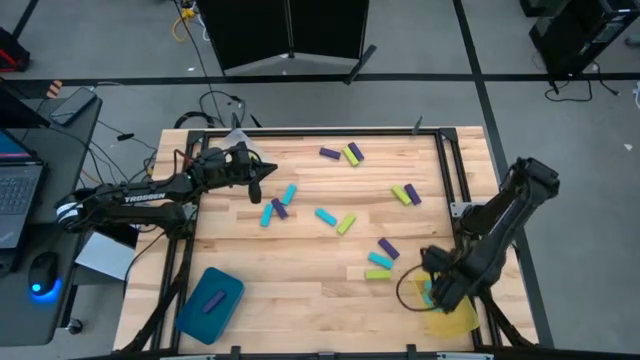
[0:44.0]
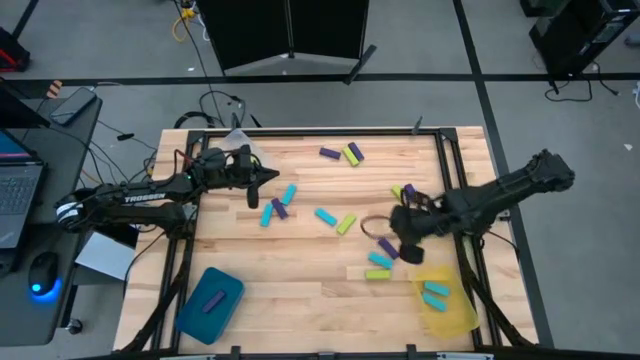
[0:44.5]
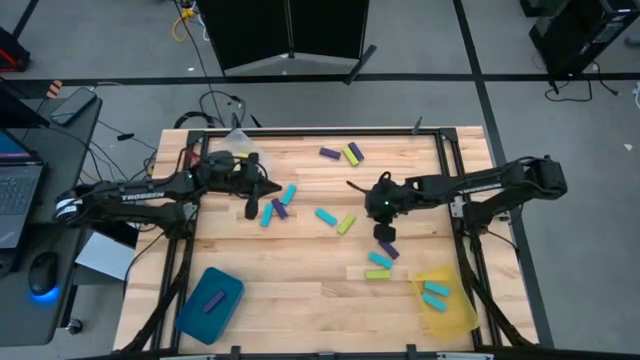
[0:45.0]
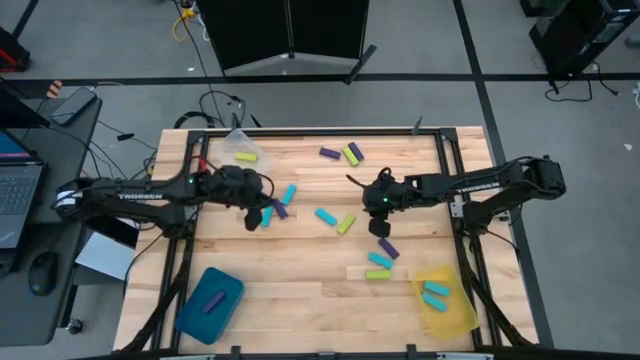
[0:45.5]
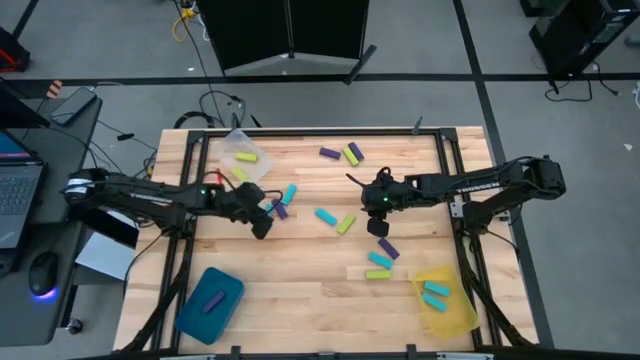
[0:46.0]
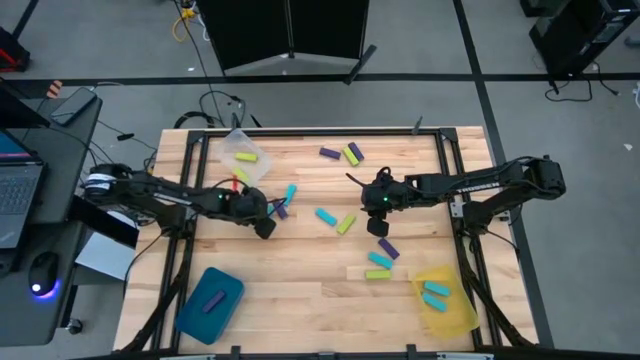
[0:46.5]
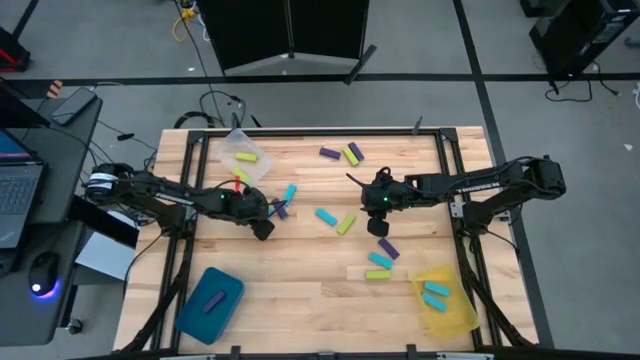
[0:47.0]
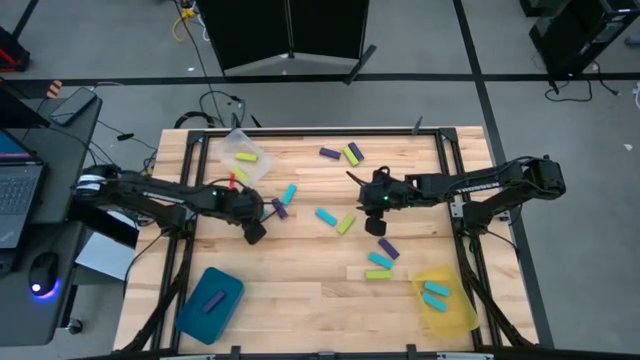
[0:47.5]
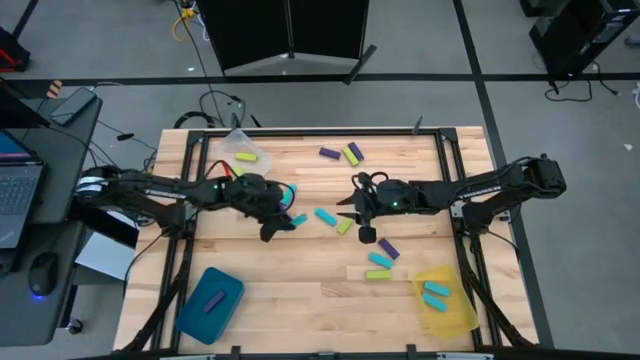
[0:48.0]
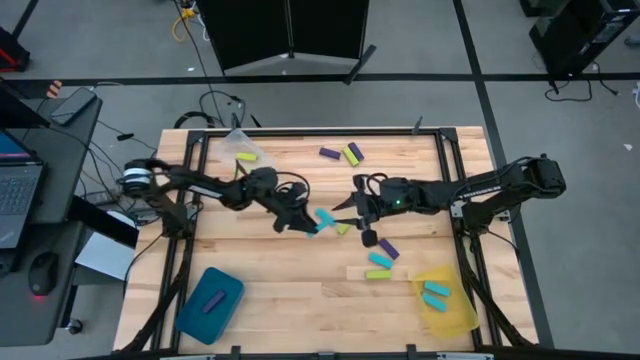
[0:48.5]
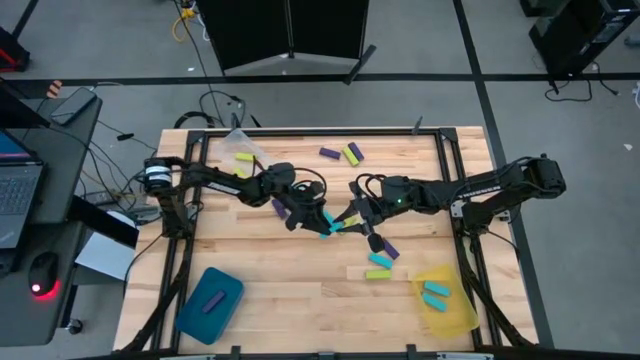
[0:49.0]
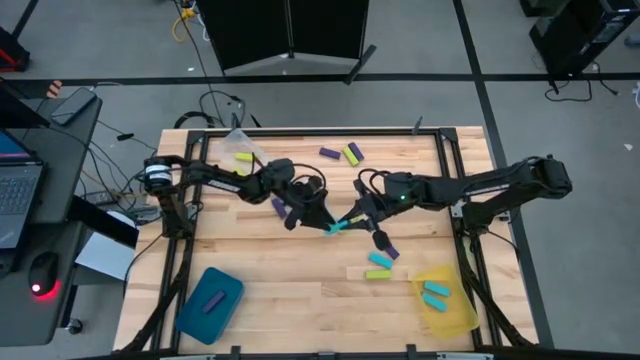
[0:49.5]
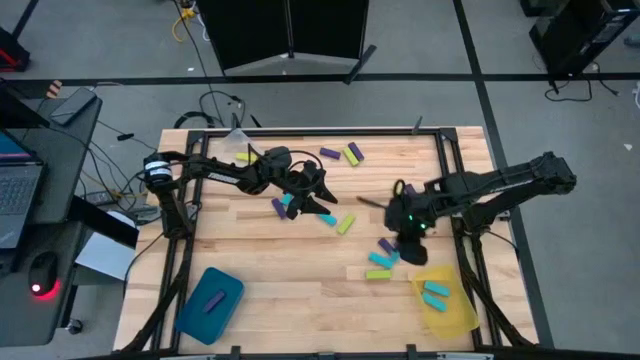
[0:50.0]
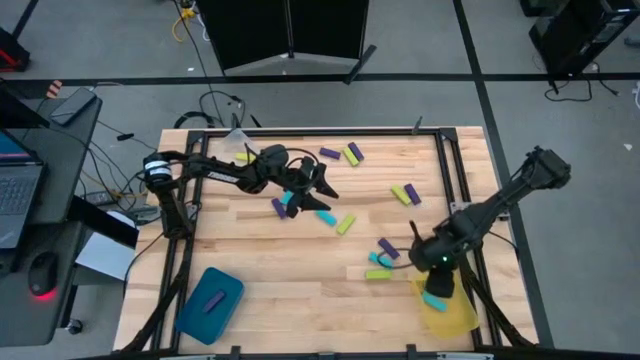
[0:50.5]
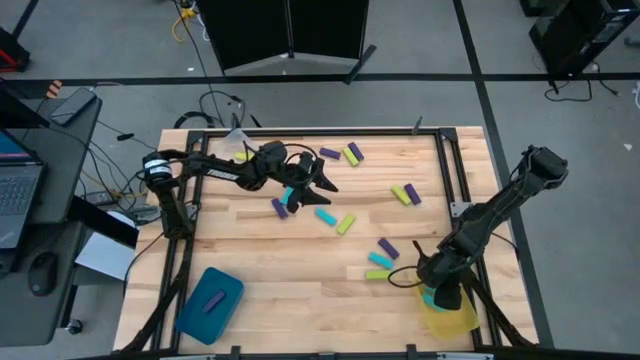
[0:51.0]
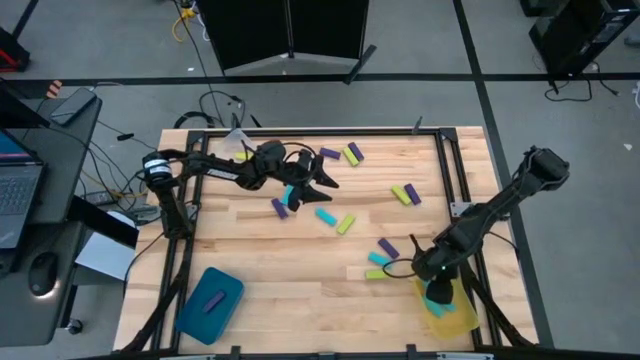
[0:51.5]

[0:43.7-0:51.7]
Task: Sort blocks
Put the blue block into the yellow bin

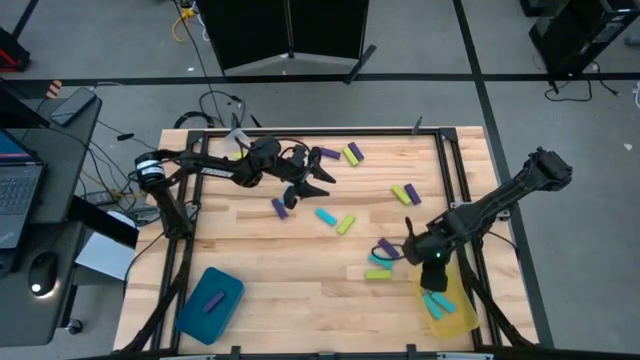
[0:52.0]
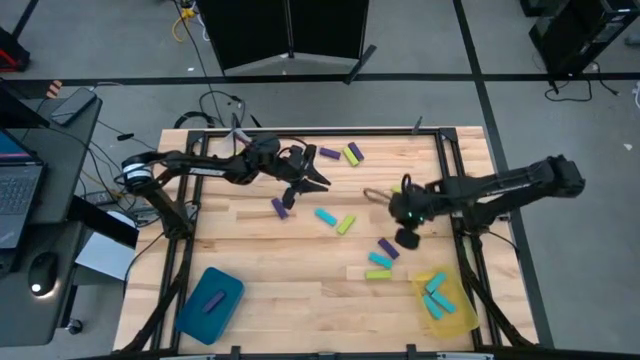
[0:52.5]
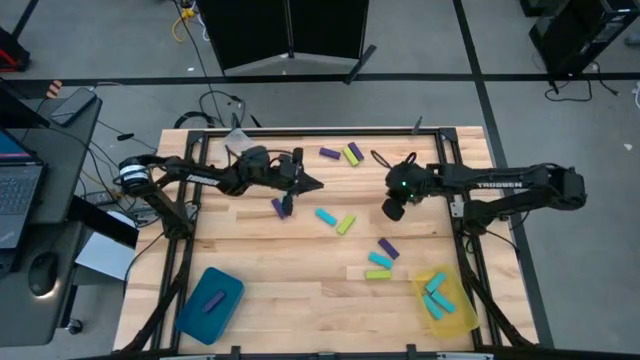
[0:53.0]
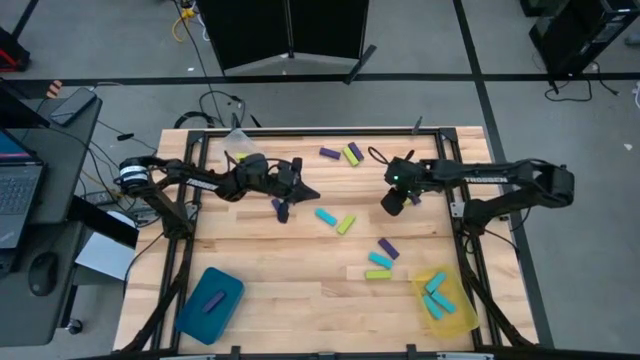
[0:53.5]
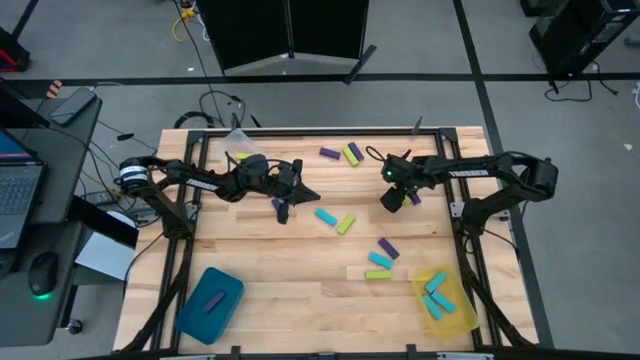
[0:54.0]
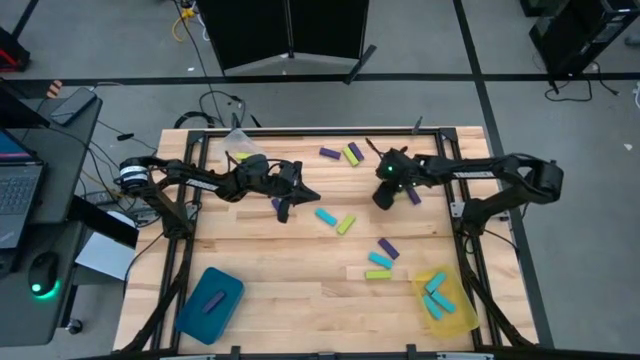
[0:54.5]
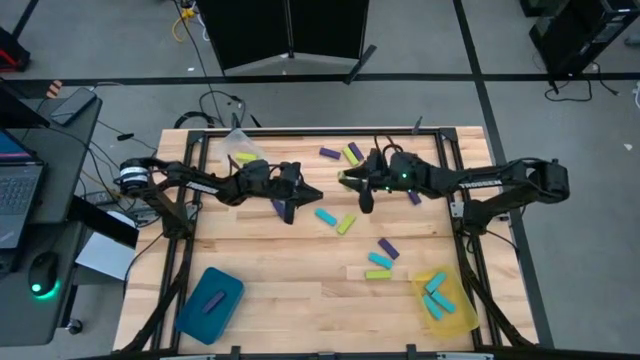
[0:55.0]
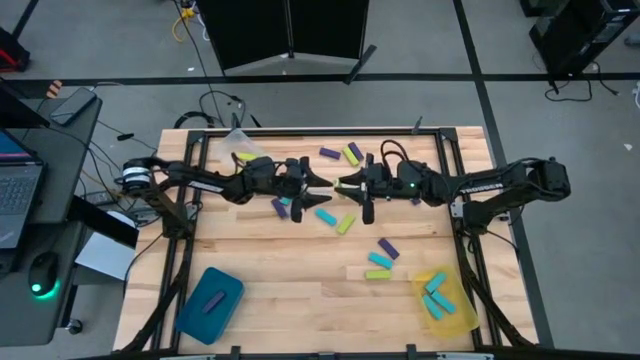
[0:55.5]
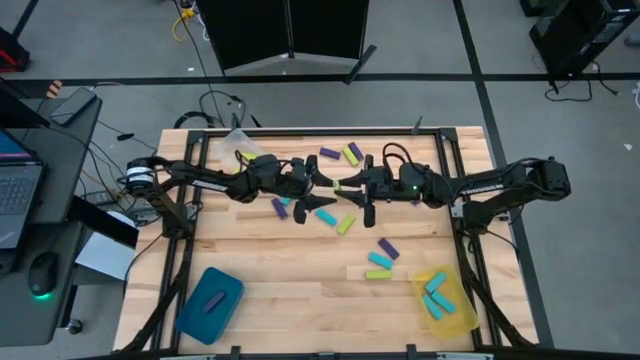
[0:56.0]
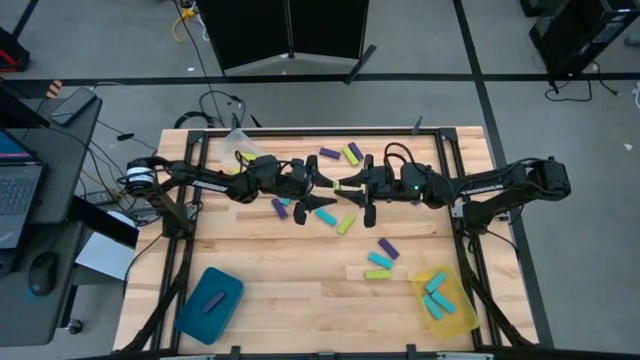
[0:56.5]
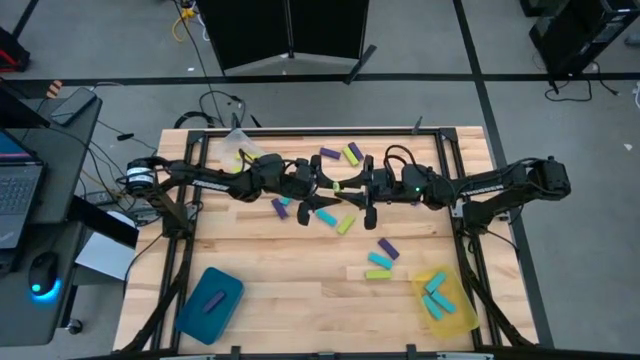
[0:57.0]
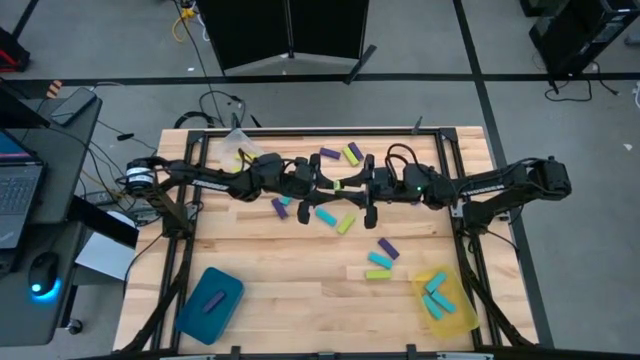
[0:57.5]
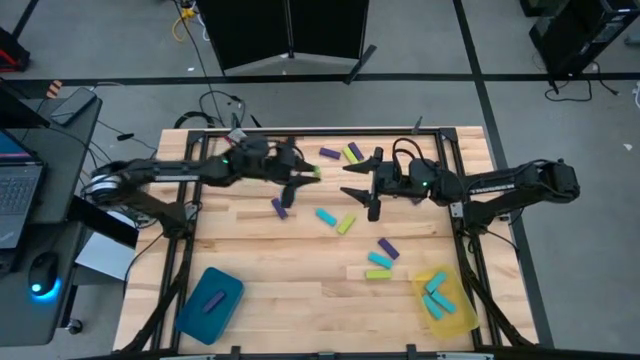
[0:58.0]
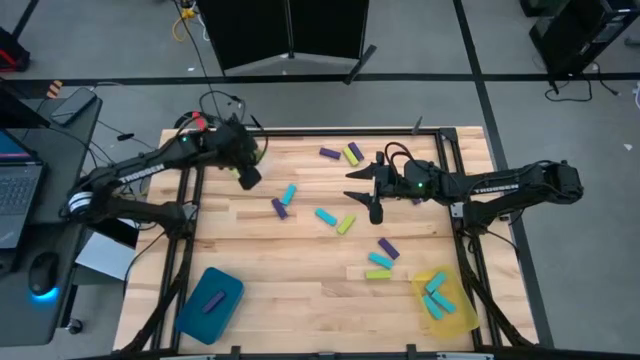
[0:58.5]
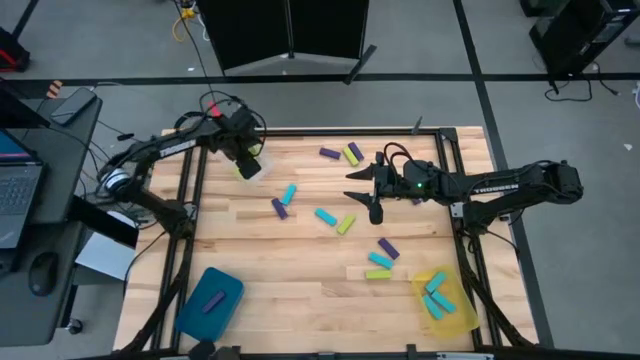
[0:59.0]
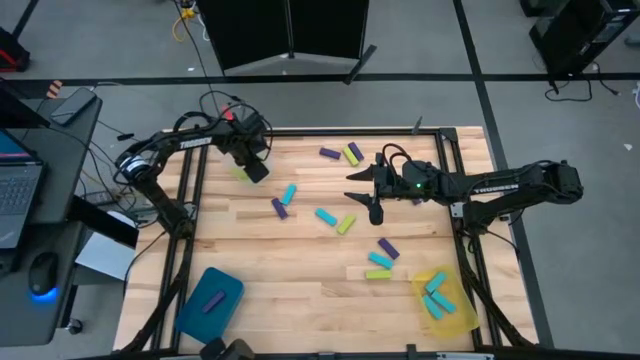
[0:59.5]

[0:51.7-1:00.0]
Put the green block into the transparent bin

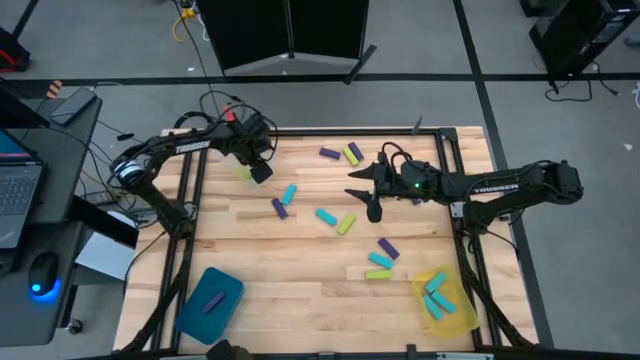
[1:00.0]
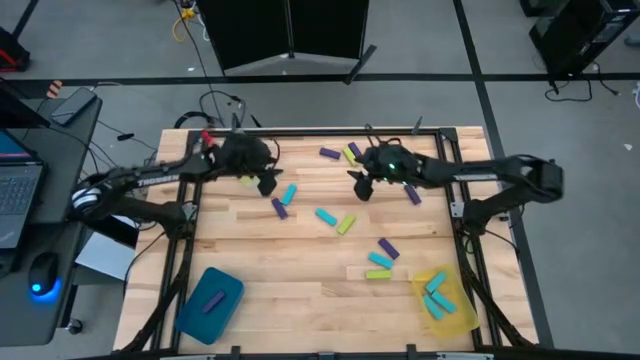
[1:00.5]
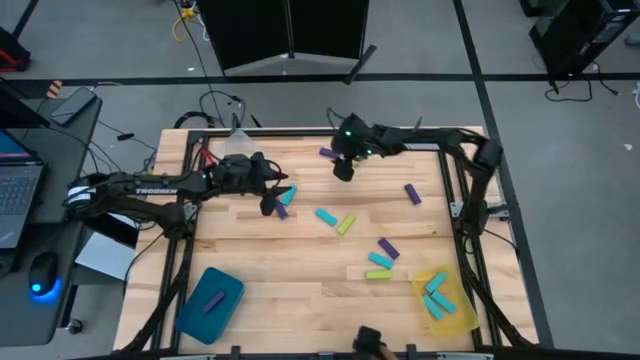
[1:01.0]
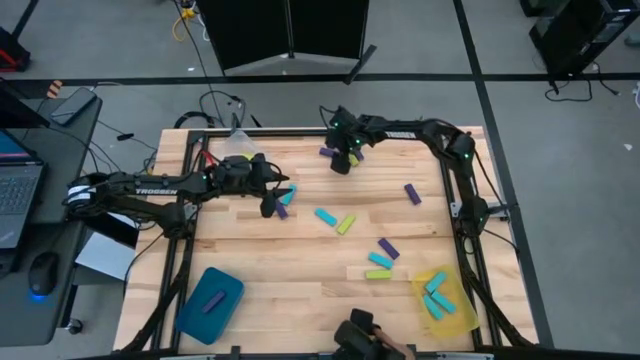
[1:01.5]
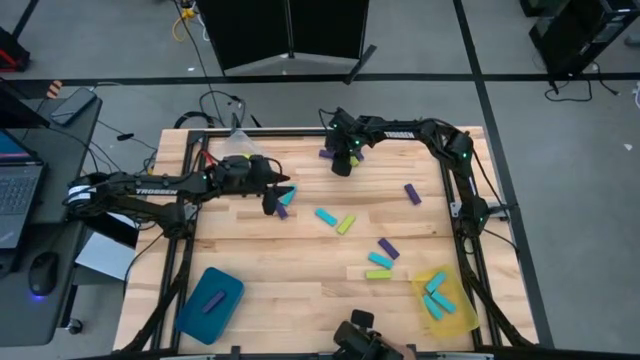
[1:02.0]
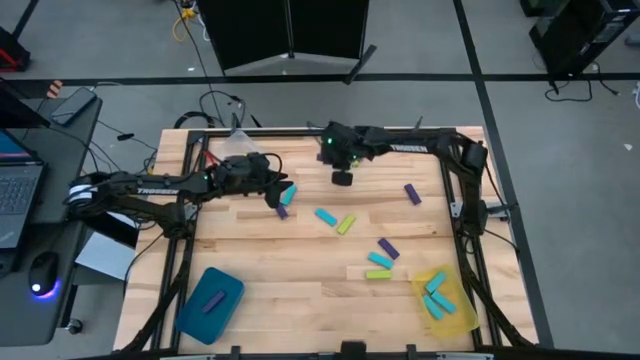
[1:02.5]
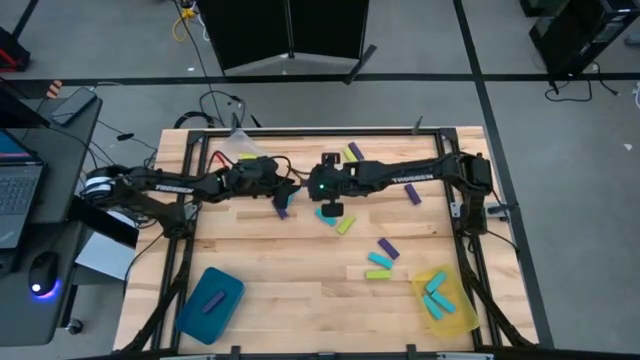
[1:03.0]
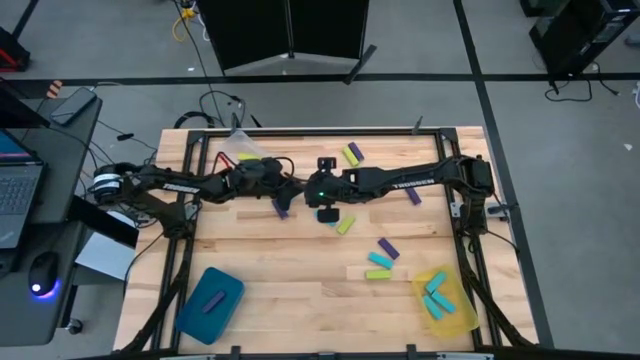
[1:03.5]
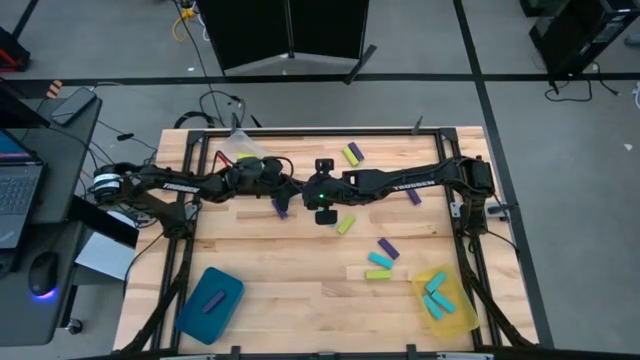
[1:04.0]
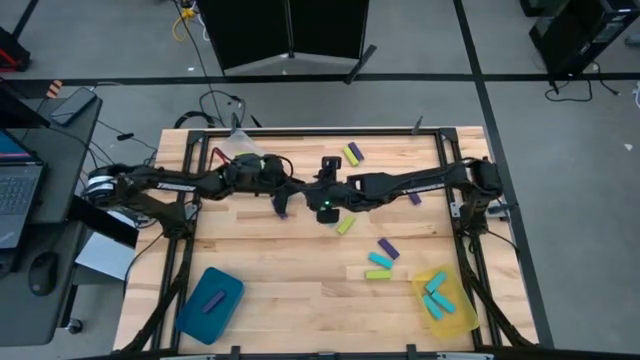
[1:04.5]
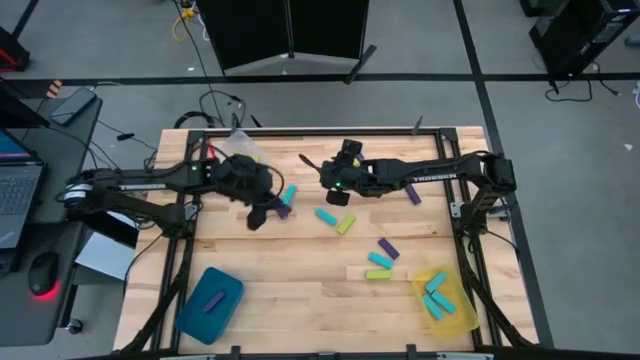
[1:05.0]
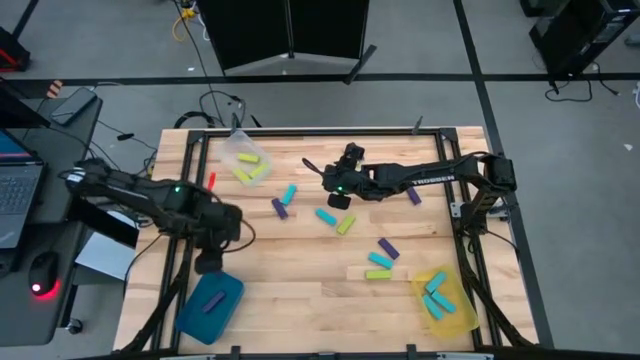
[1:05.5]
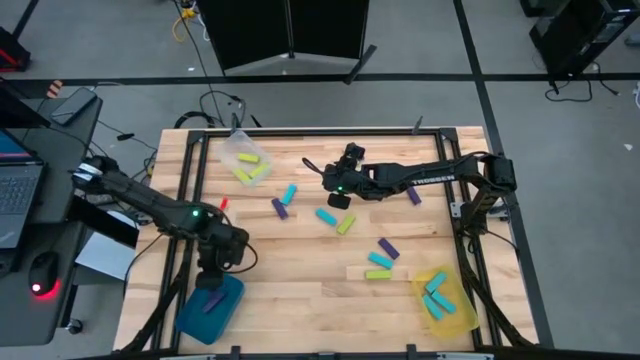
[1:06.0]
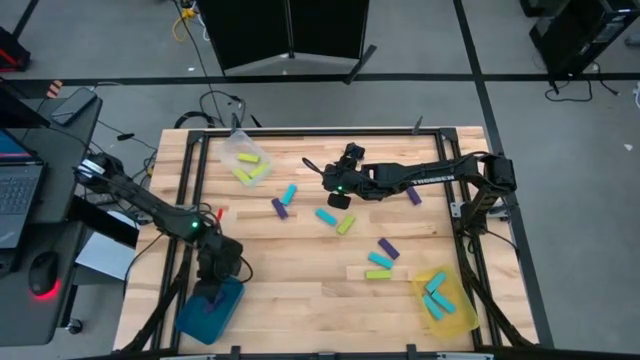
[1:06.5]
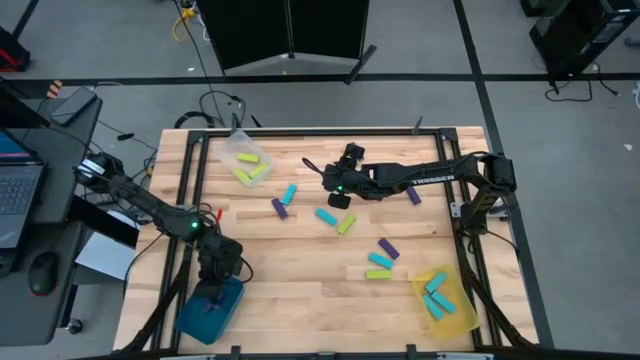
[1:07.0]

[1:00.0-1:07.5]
Put the purple block into the blue bin
